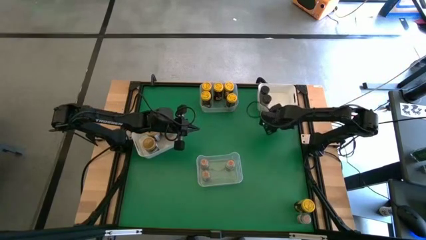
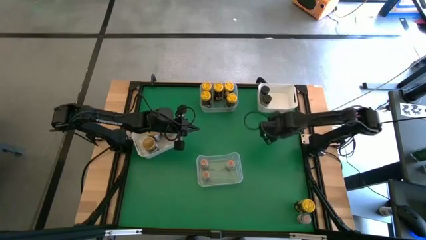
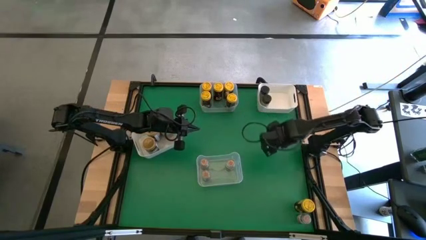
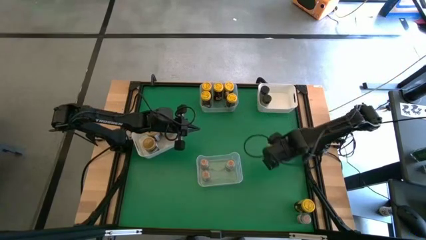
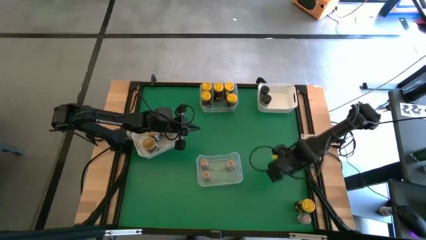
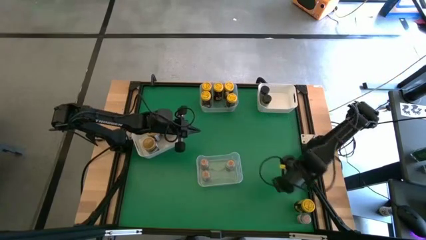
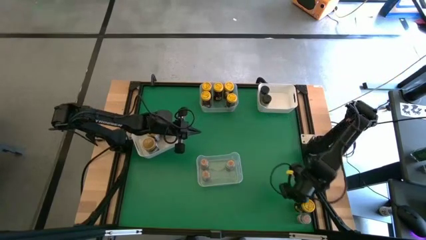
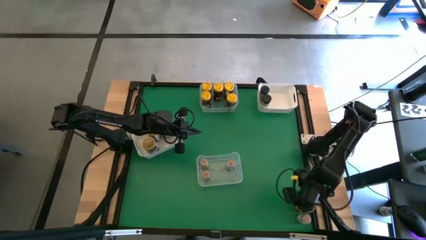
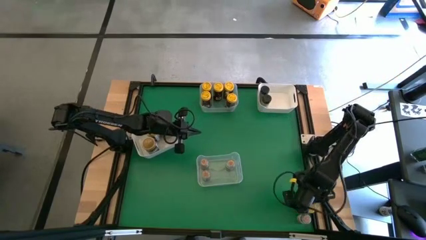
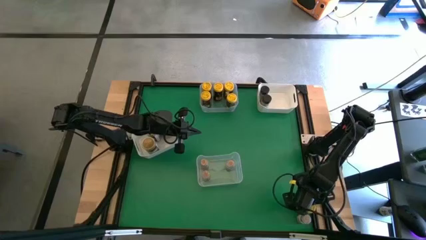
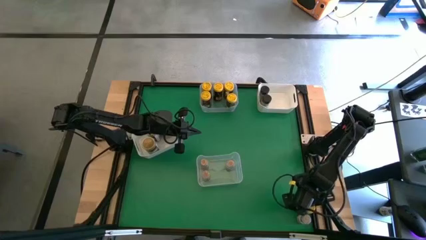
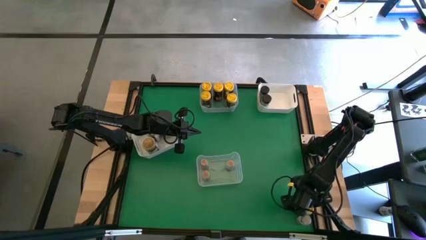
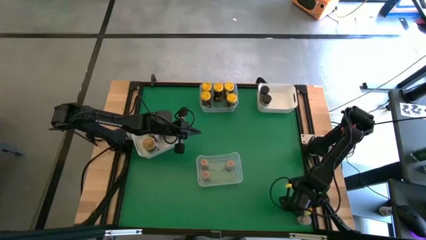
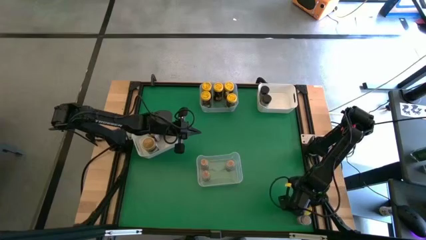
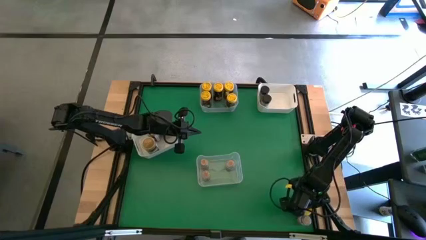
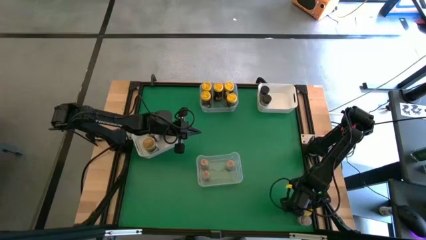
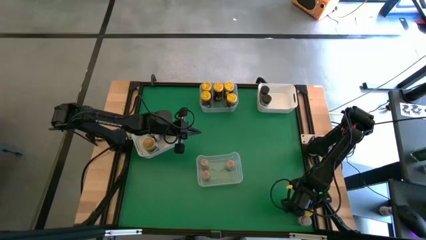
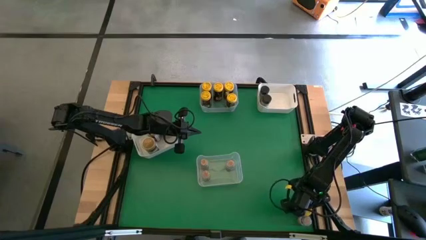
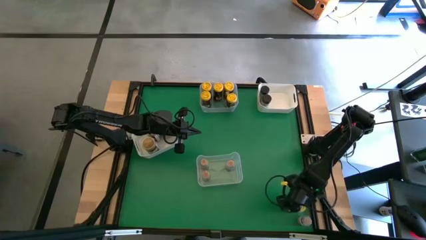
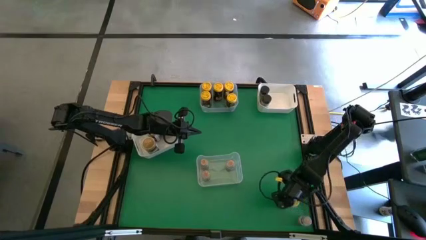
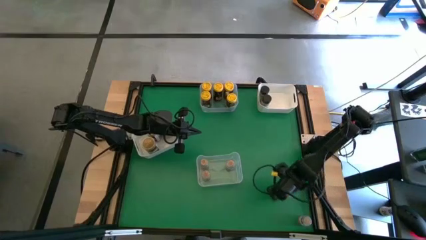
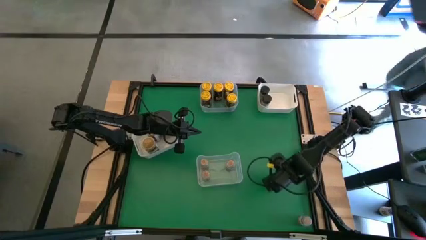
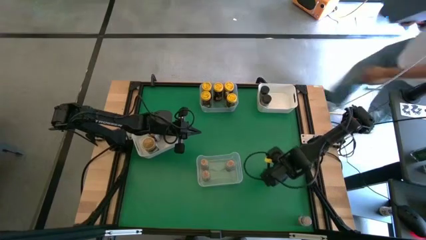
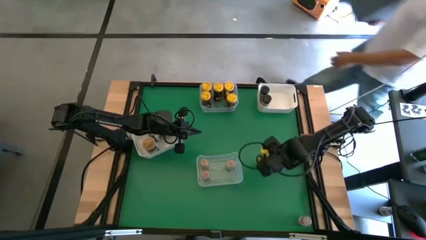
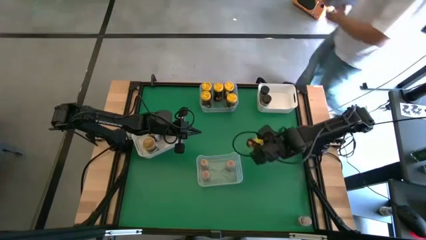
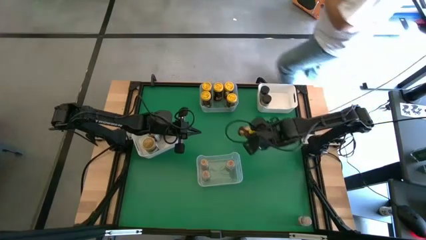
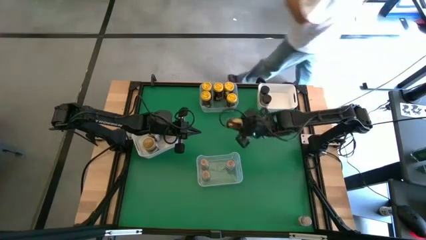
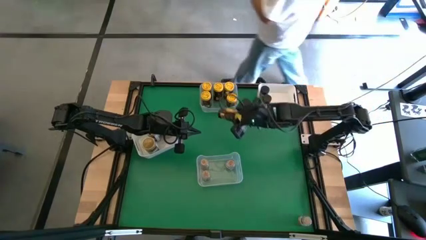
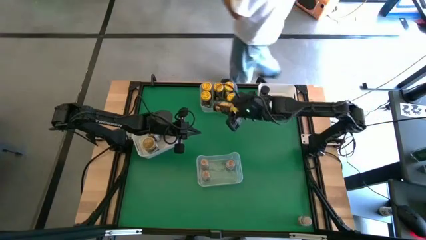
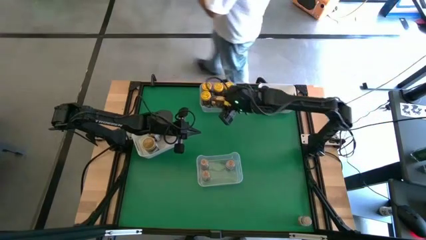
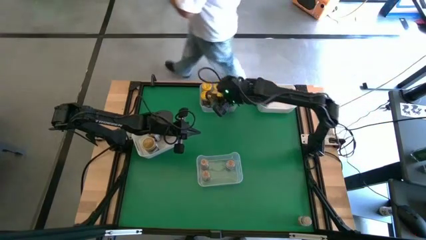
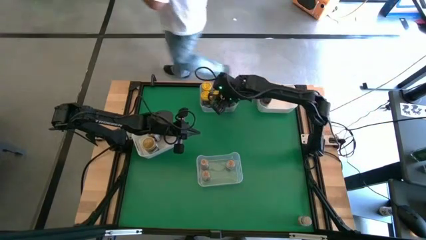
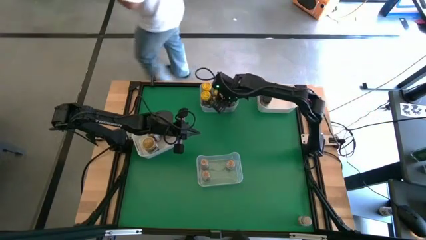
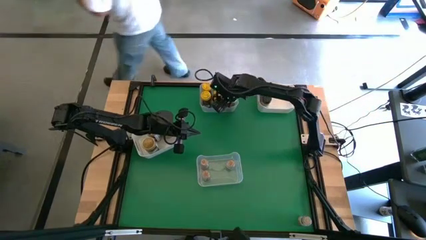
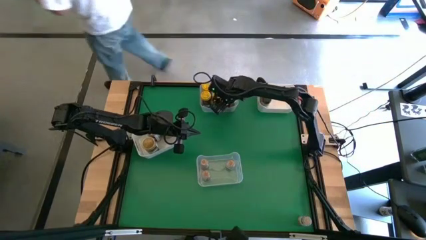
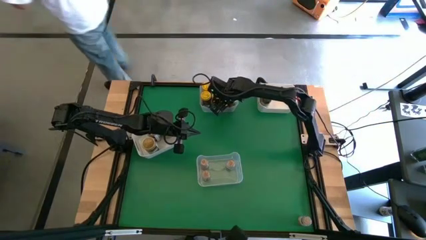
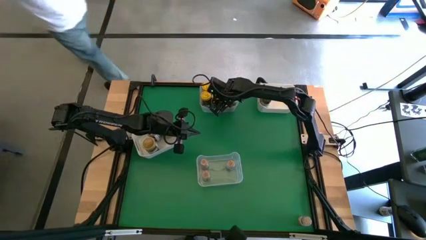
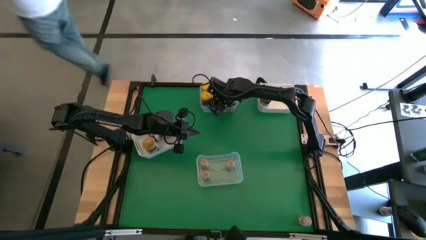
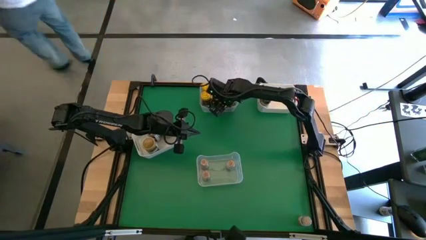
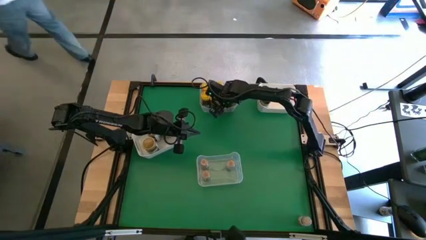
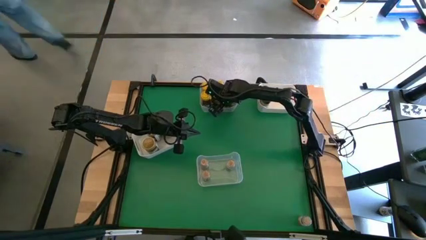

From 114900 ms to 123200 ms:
Task: Sort spices by type
Put the yellow spice bottle into the top transparent bin

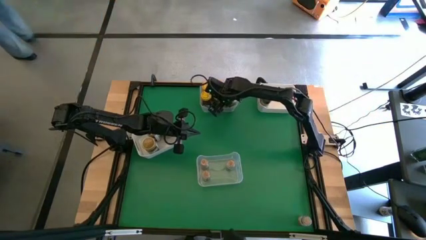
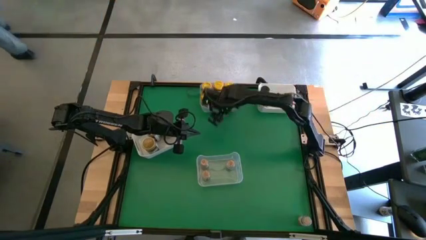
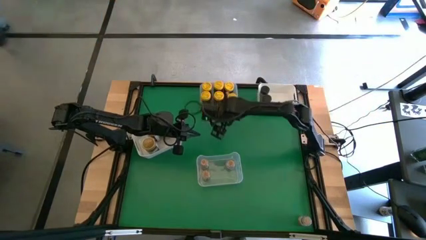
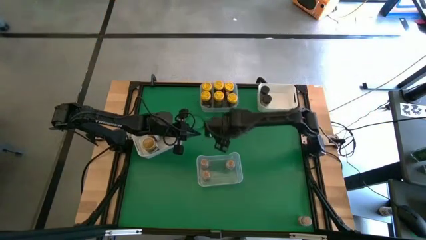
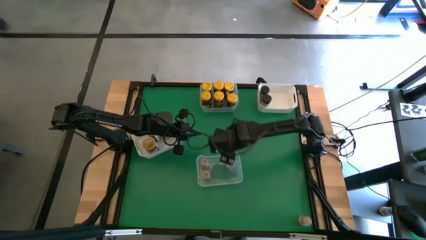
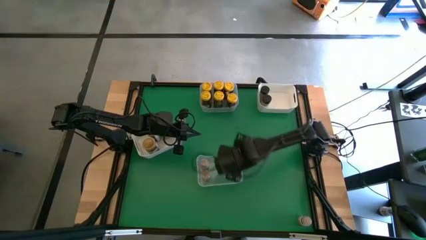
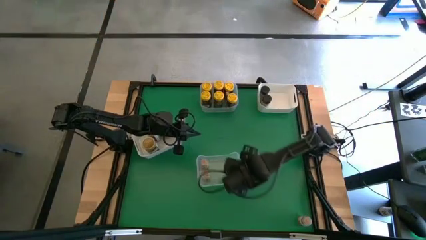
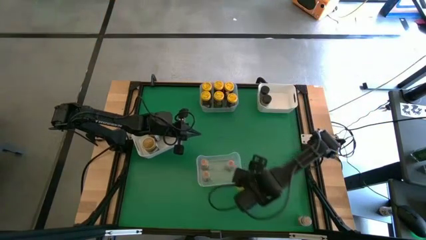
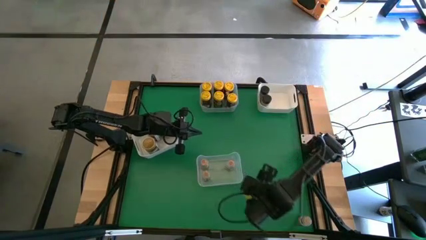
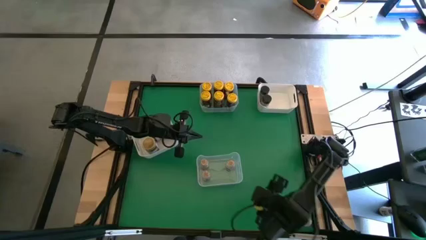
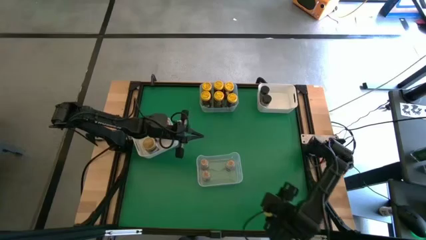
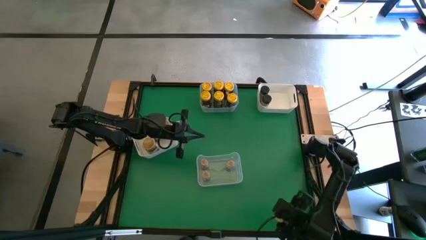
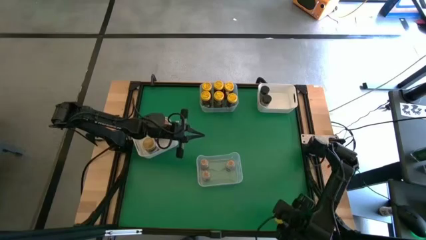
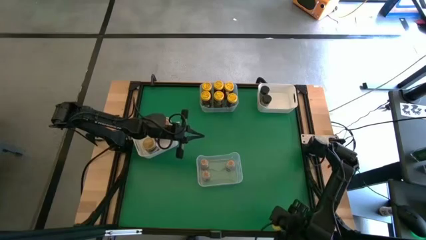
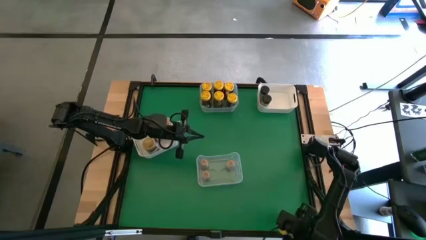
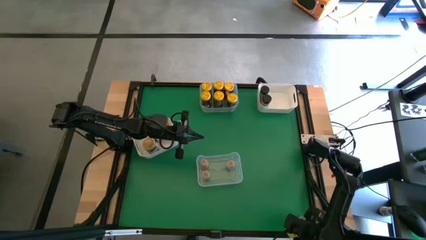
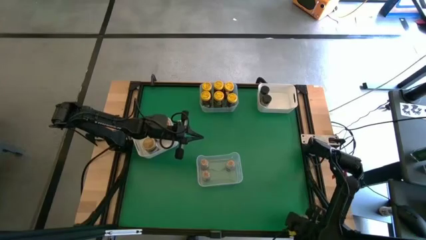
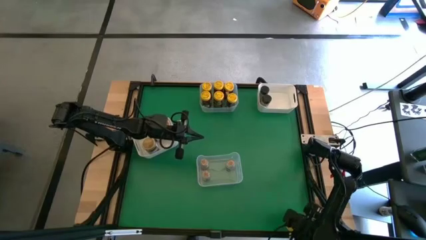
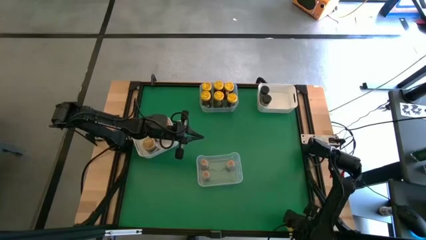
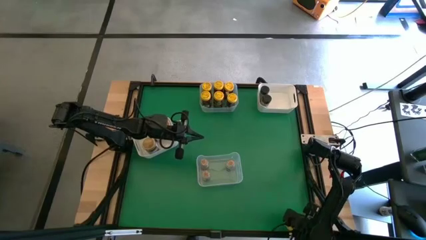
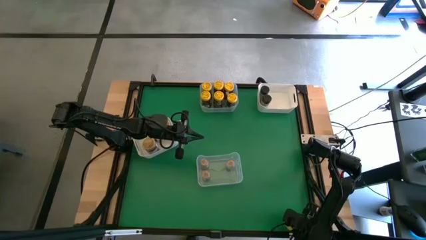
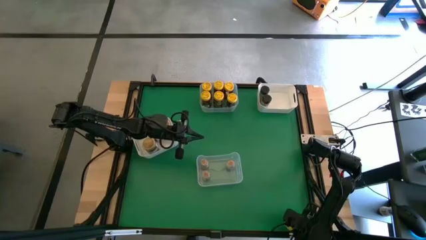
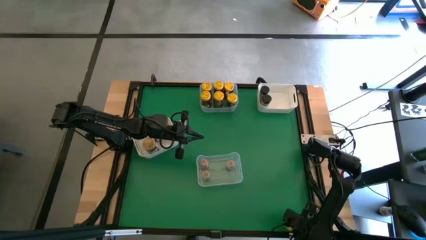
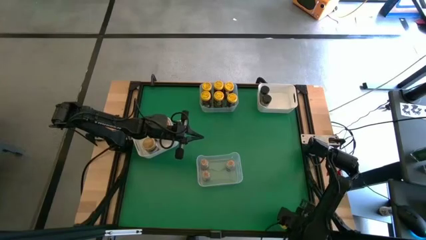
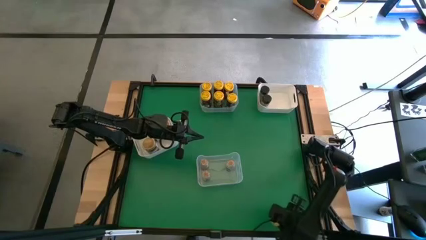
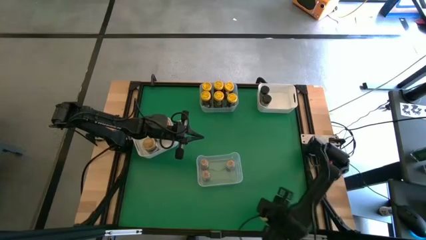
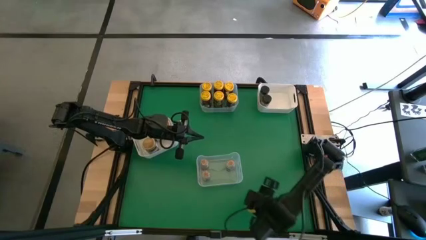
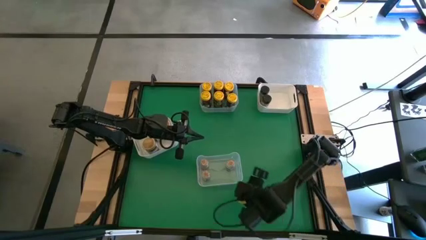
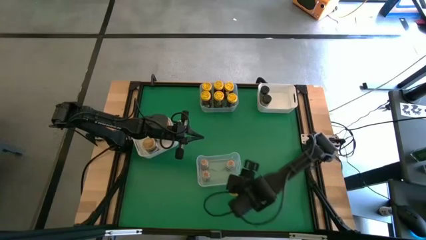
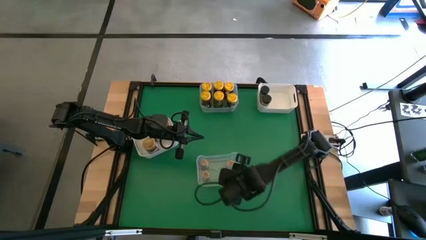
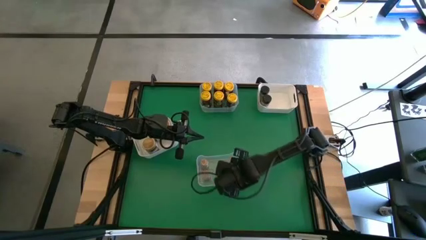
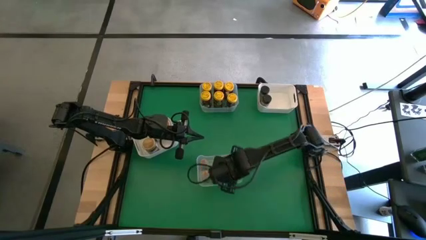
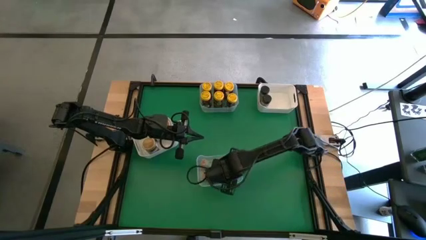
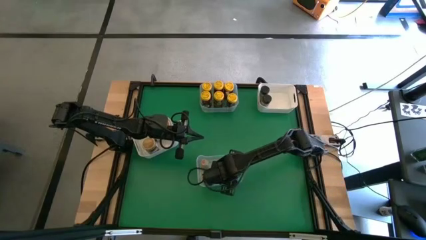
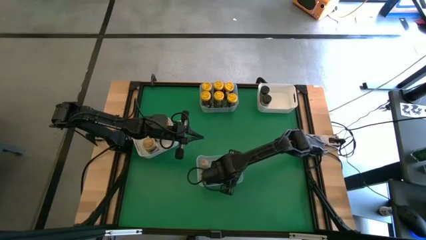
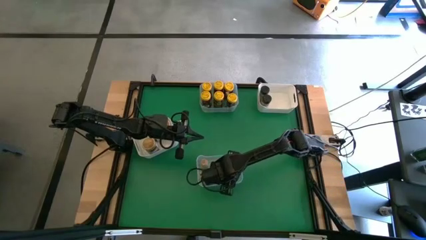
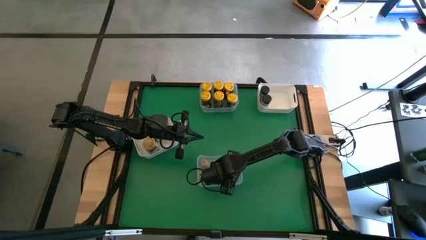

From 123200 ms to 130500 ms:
Put the brown spice bottle into the bottom transparent bin
